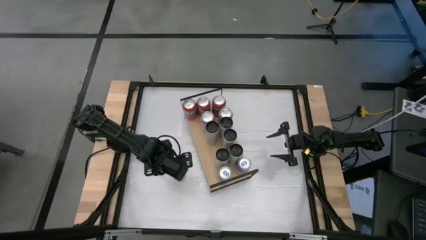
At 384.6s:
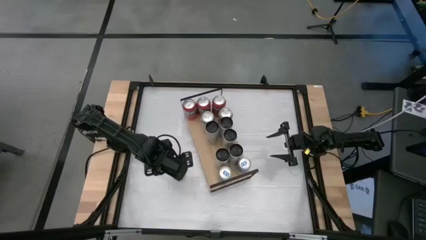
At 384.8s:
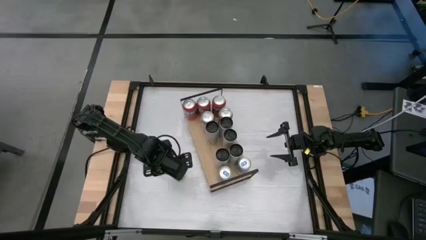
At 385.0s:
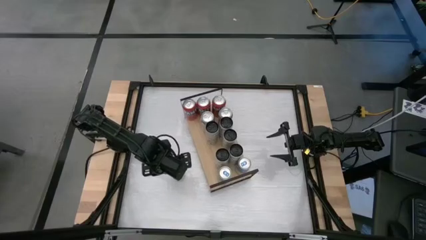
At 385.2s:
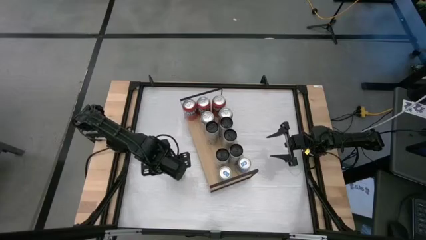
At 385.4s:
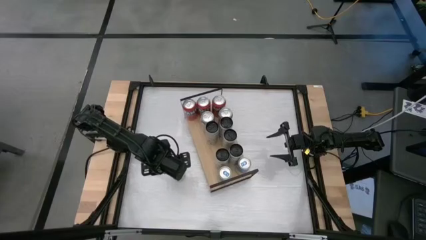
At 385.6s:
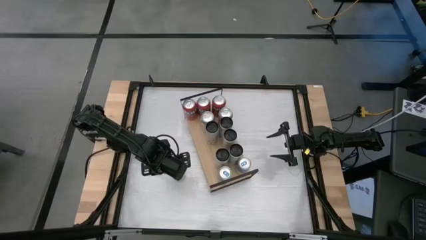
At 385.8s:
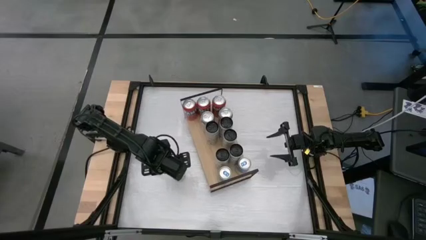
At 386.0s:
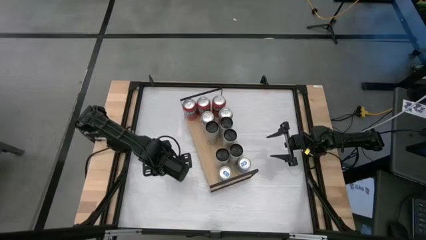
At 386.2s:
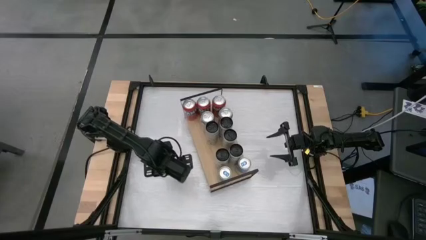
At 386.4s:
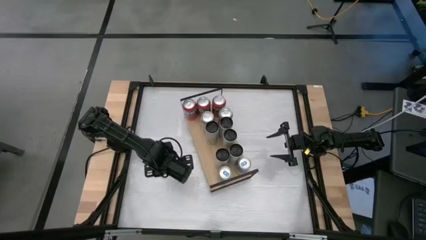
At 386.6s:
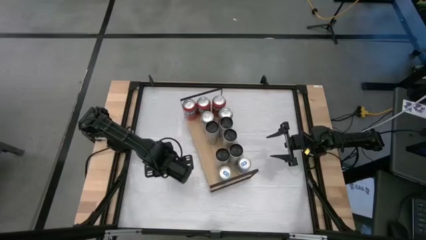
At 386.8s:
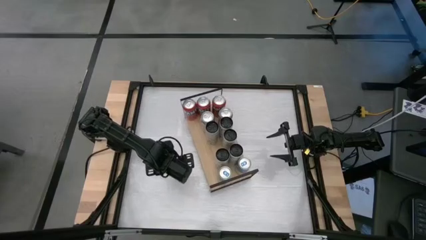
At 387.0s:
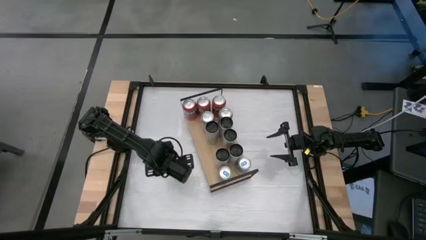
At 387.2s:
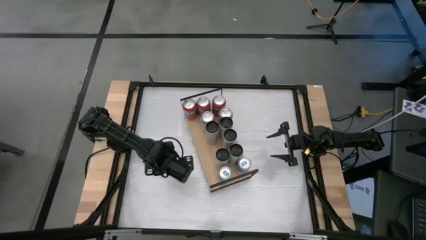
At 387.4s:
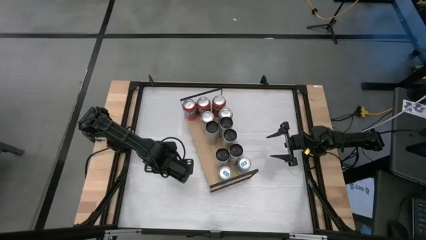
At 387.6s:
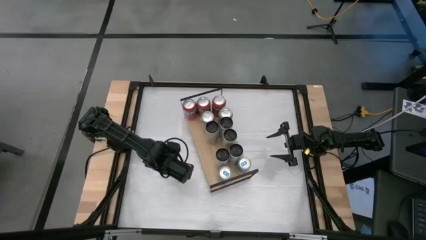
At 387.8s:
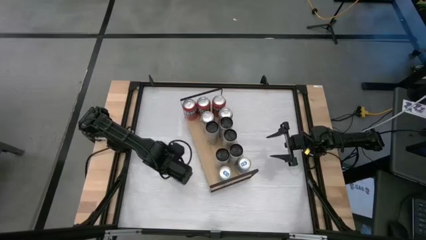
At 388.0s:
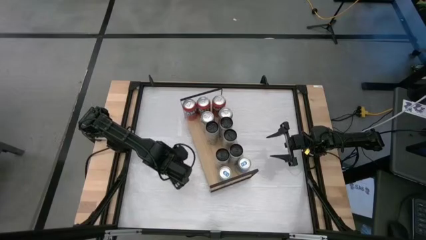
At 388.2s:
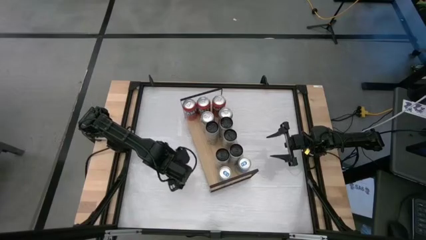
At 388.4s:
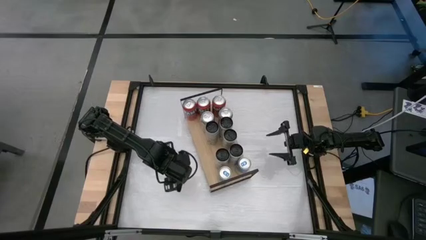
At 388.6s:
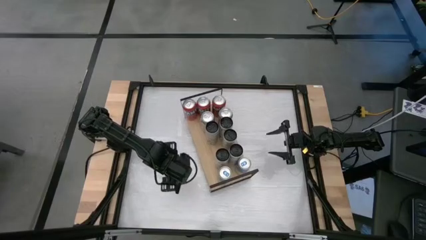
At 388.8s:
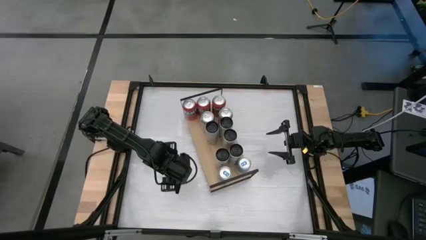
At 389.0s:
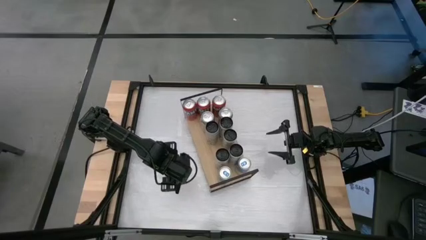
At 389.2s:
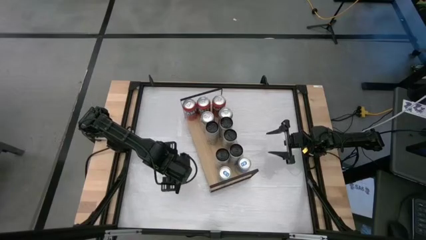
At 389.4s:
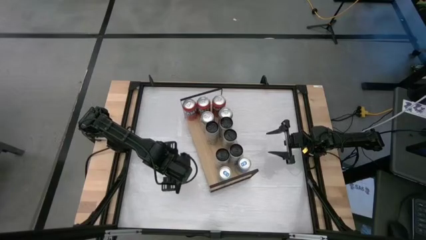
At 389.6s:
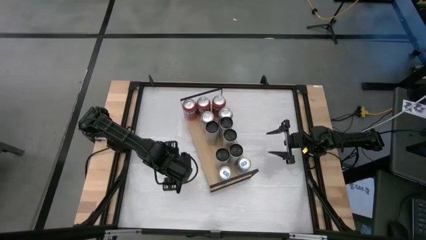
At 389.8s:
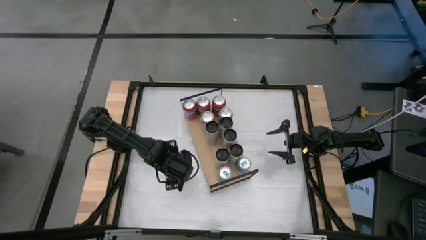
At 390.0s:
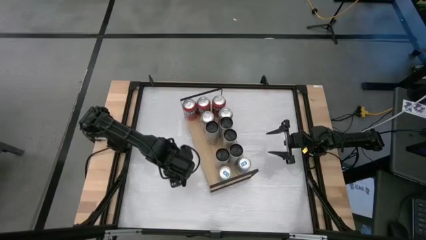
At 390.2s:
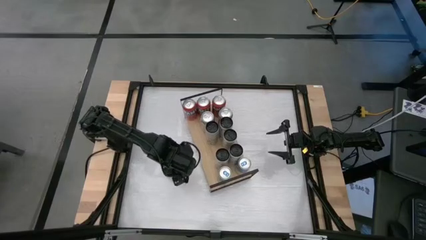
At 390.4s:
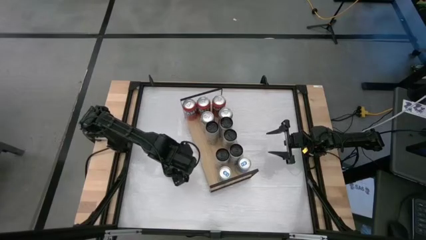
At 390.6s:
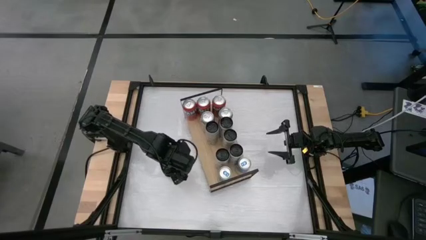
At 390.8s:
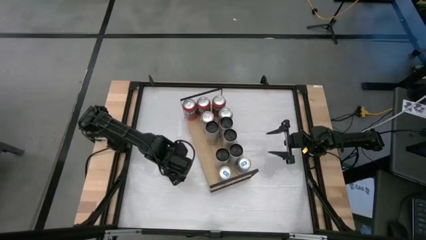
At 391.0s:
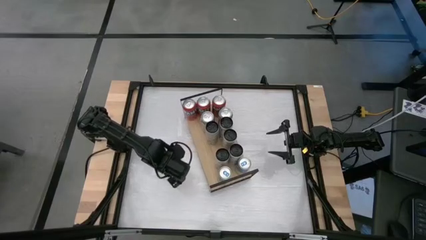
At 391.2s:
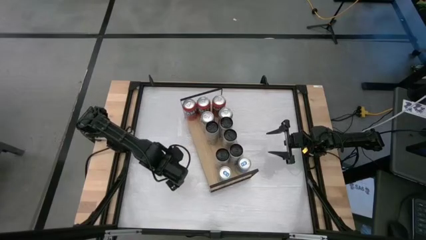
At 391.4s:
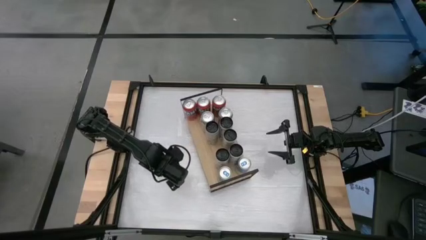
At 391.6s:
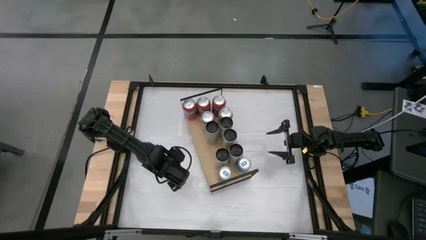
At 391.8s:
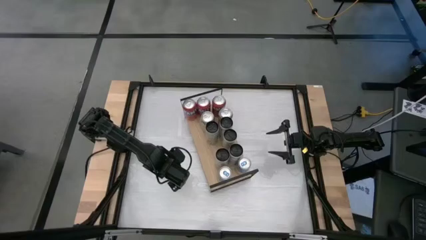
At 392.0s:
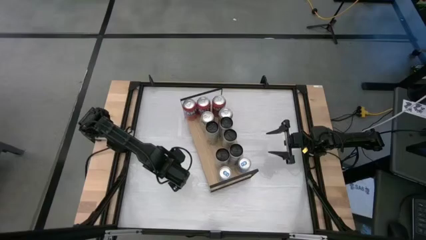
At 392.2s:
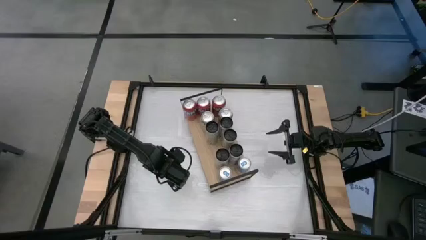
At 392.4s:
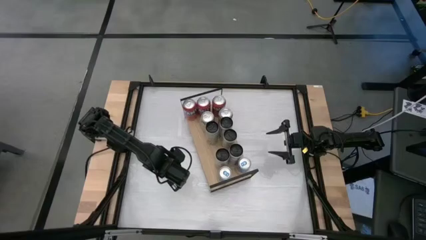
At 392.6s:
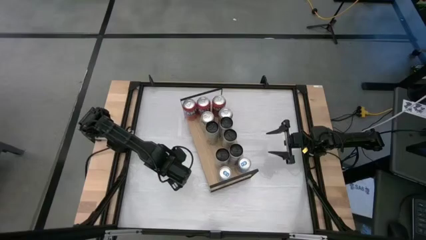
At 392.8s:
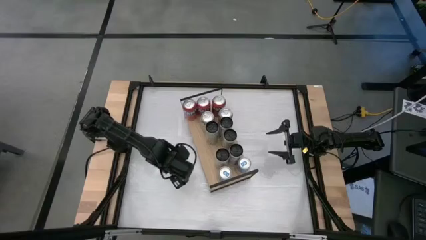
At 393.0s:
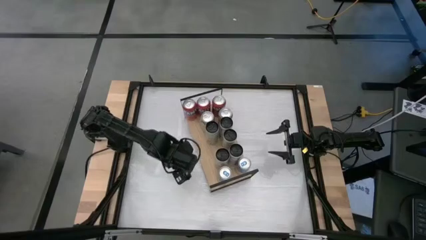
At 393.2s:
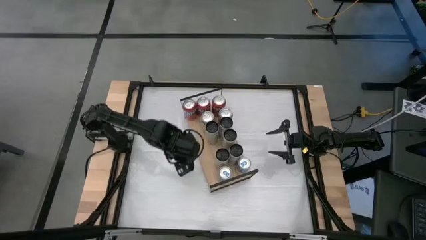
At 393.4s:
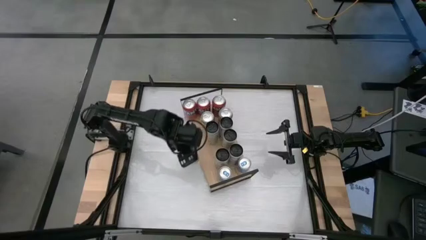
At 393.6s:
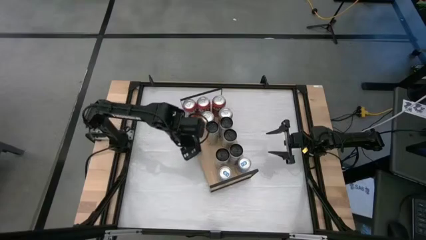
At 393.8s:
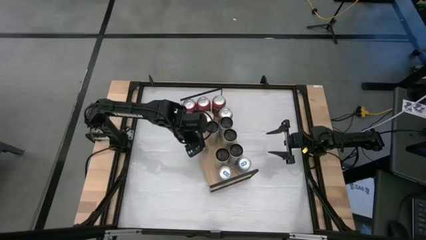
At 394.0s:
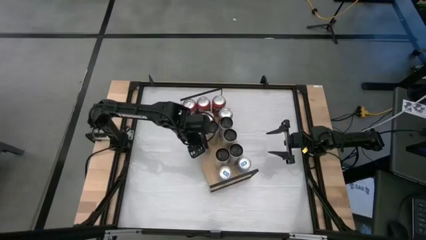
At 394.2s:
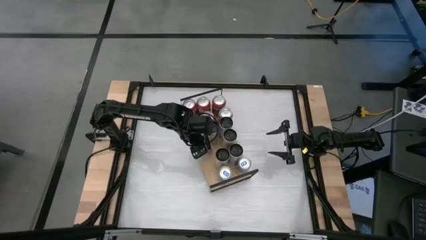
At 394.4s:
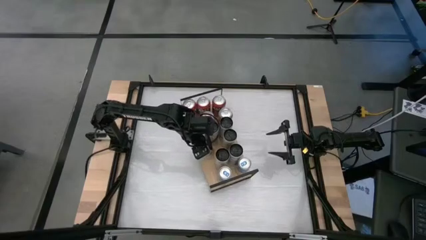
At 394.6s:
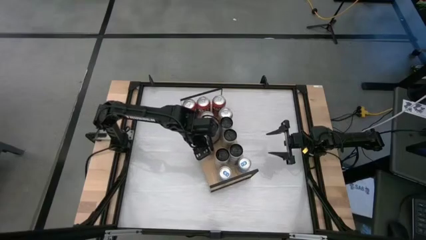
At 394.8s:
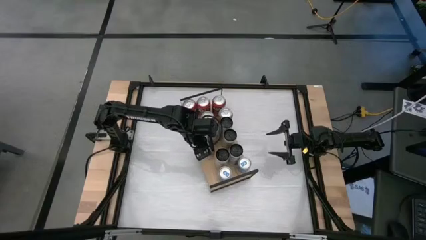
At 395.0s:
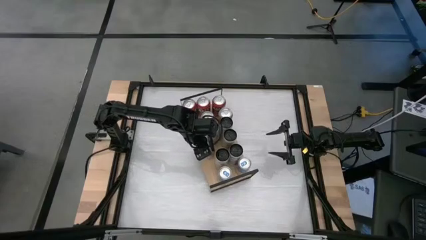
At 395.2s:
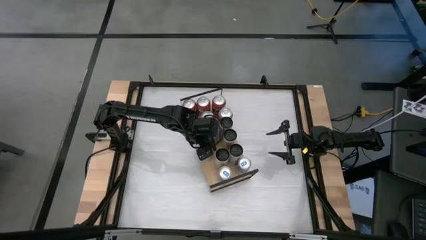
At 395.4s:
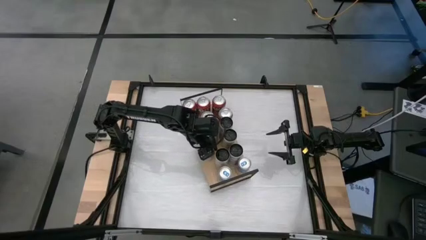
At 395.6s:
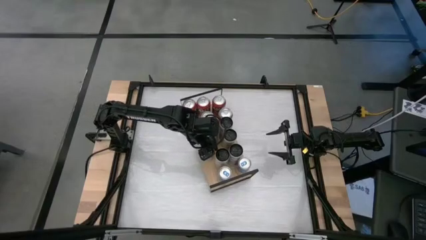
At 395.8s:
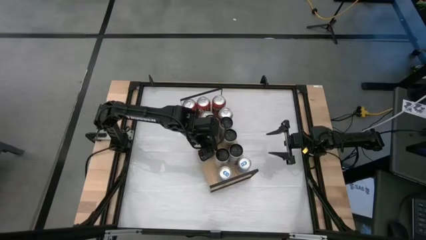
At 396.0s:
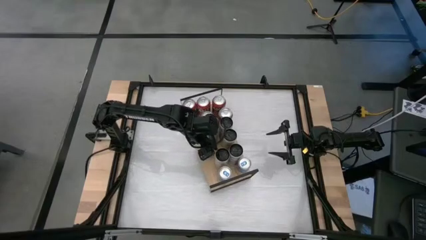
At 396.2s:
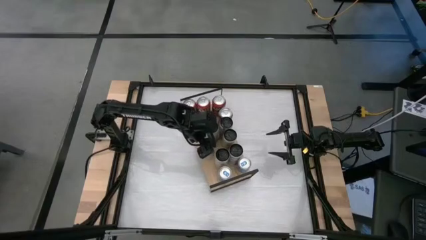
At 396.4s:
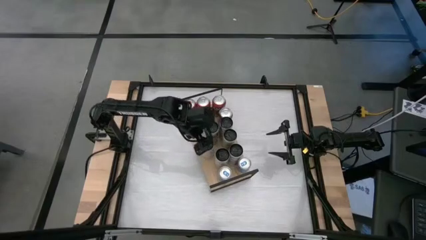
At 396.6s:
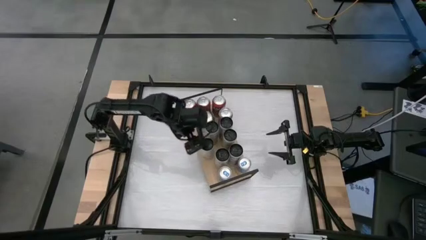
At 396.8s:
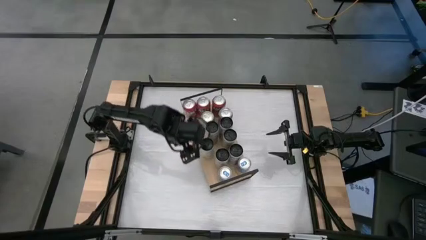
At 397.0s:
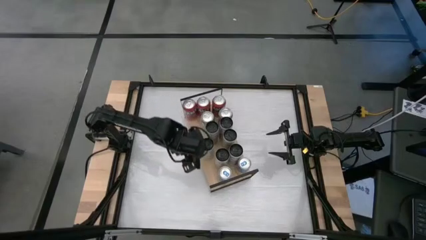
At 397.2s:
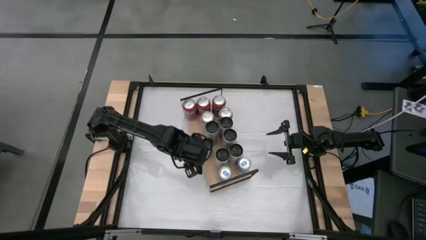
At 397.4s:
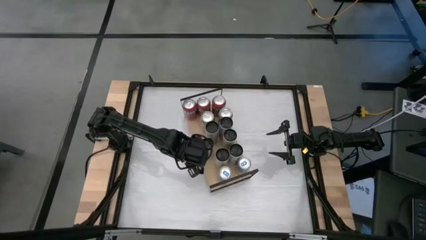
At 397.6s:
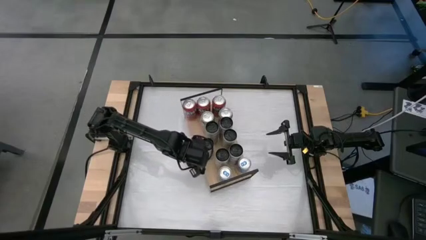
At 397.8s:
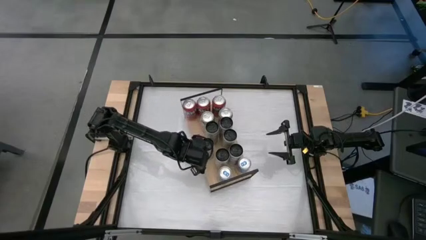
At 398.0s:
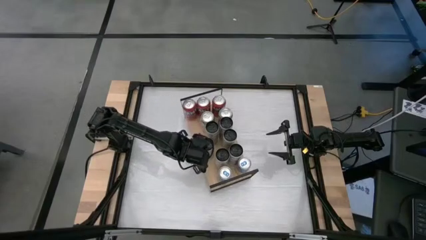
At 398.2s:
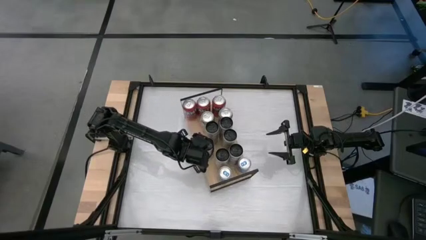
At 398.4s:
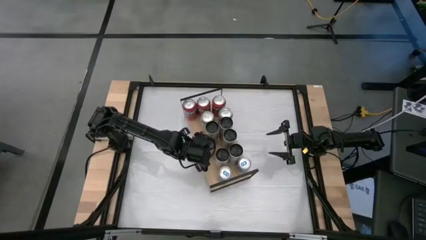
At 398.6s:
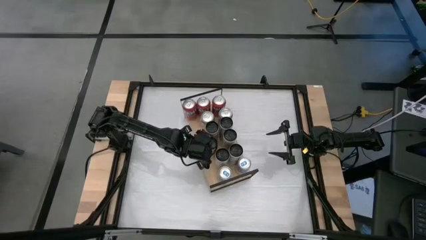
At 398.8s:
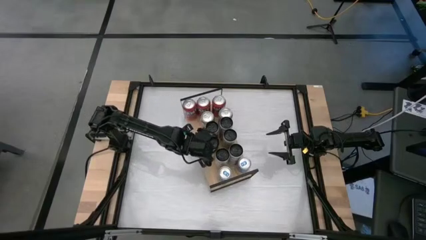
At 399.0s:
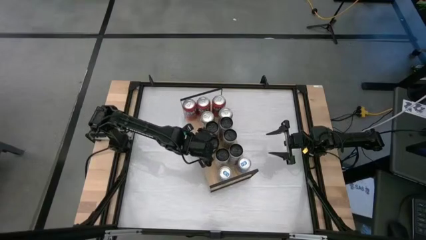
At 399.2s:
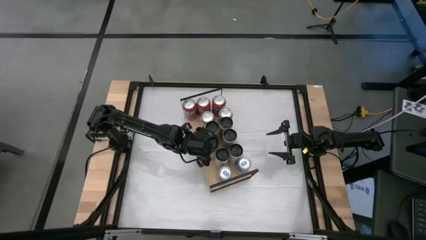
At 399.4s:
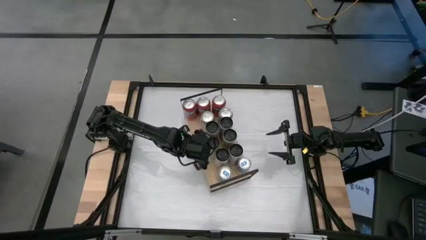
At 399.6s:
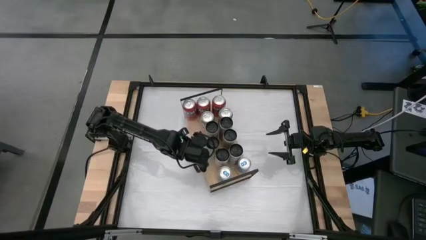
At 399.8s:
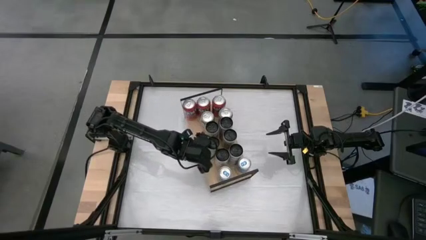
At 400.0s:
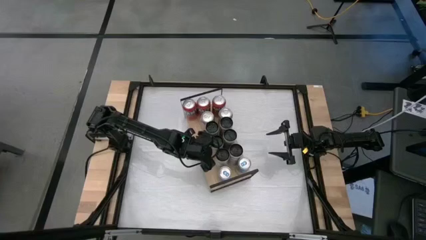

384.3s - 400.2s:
Task: Place canned beverage on shelf
Align the yellow soda can with the other yellow soda can
